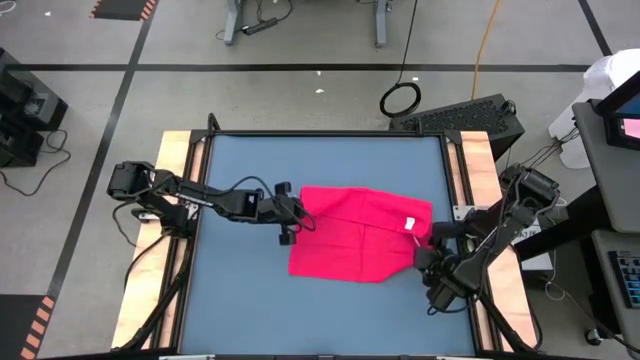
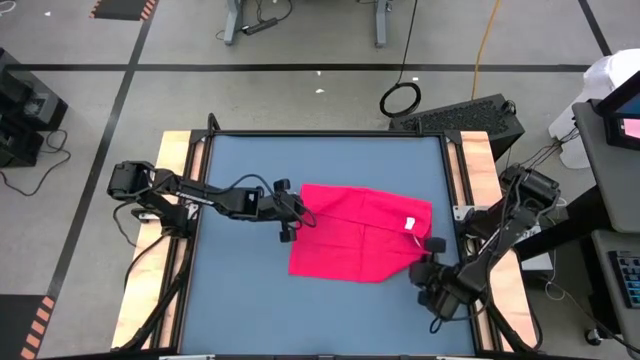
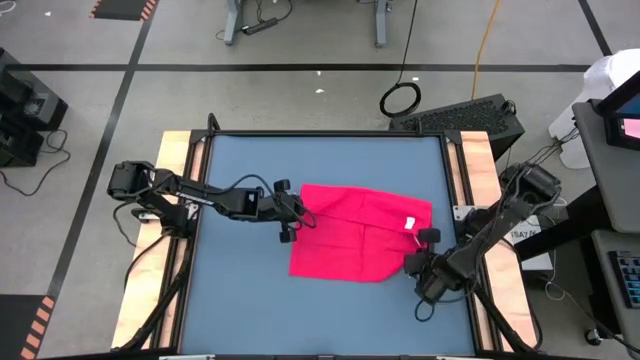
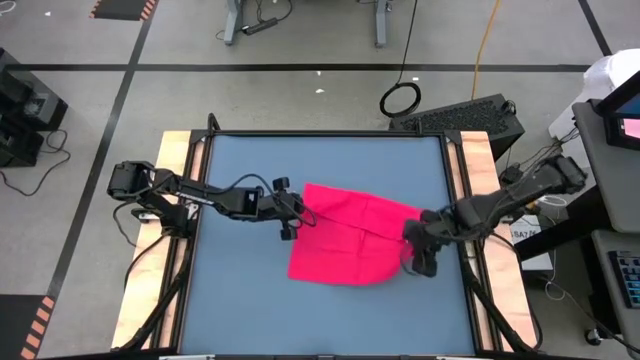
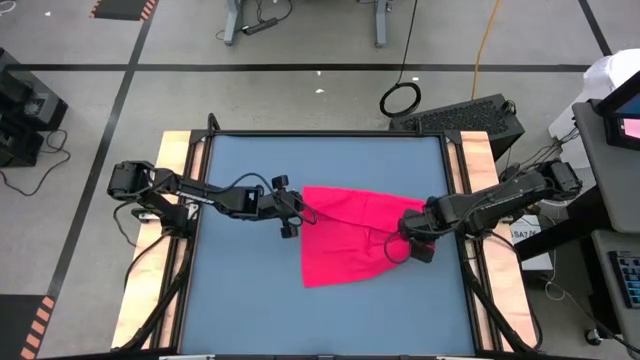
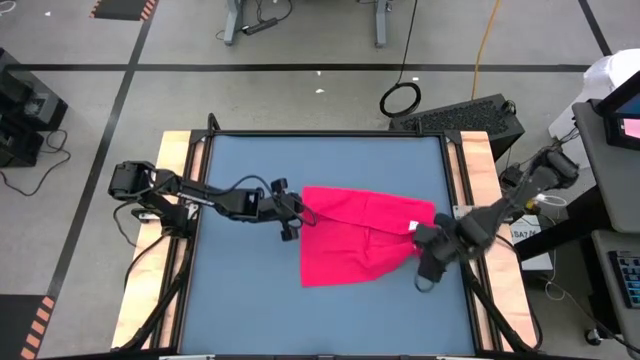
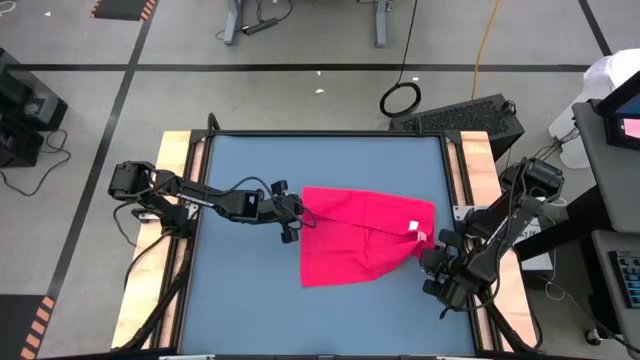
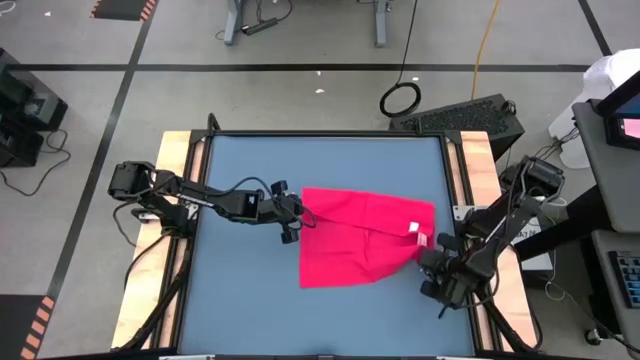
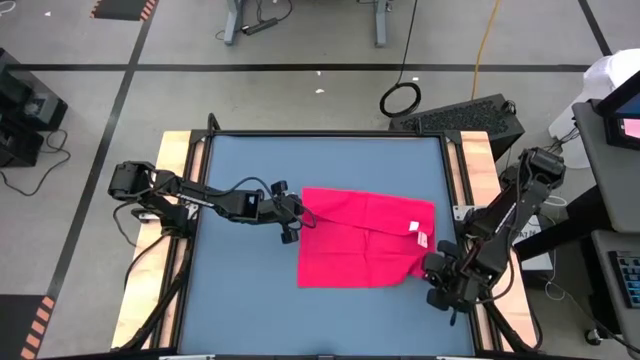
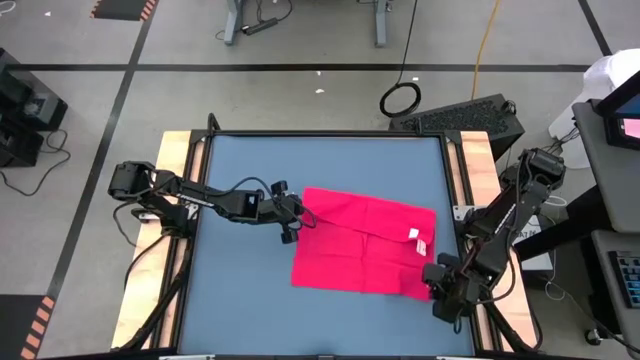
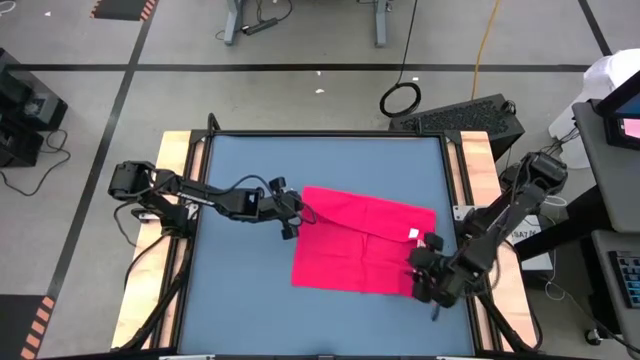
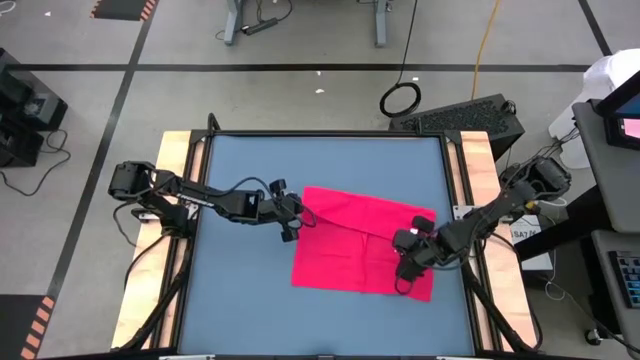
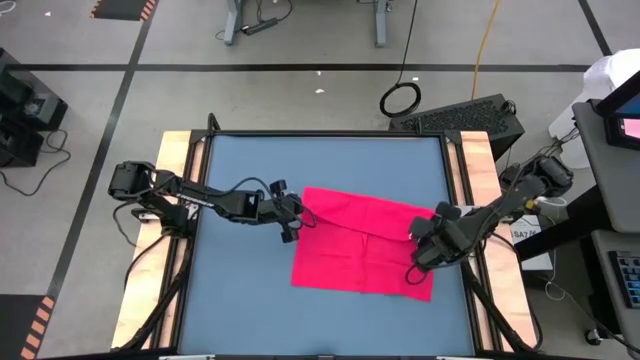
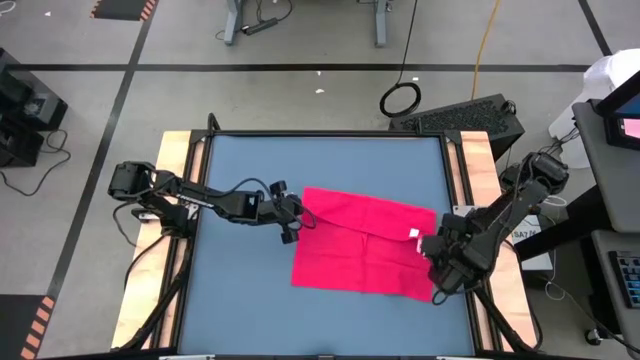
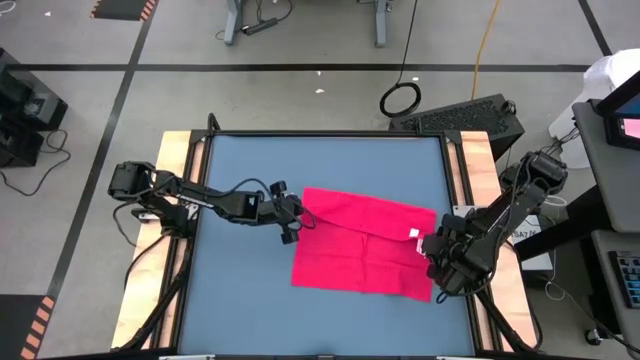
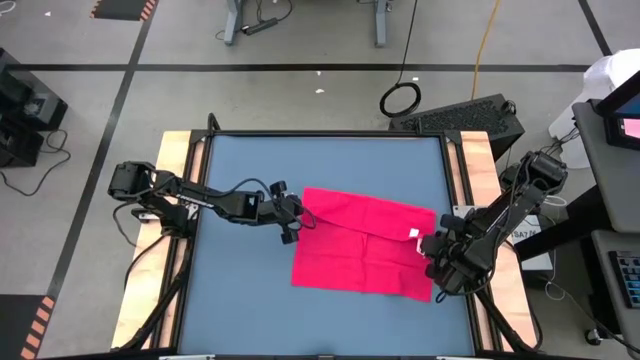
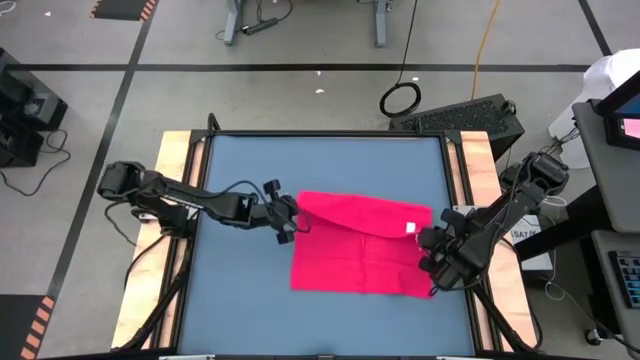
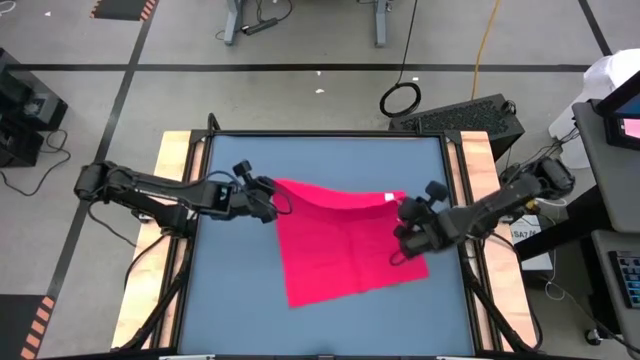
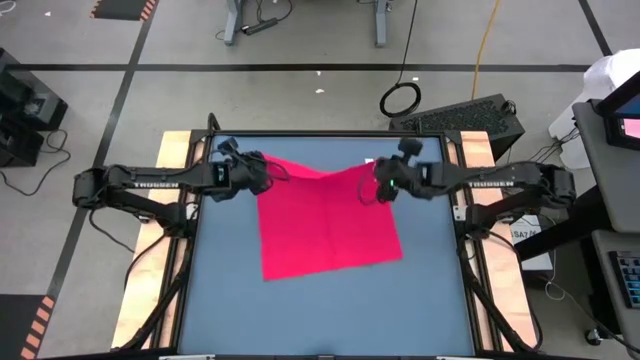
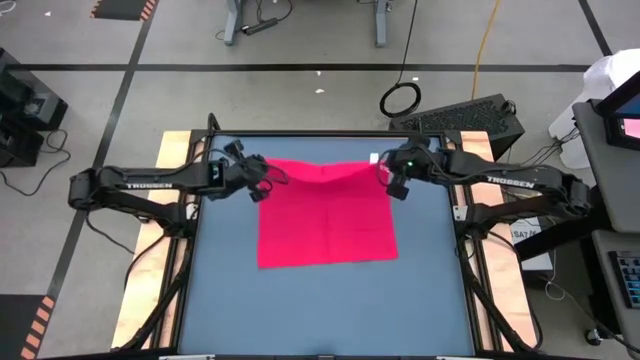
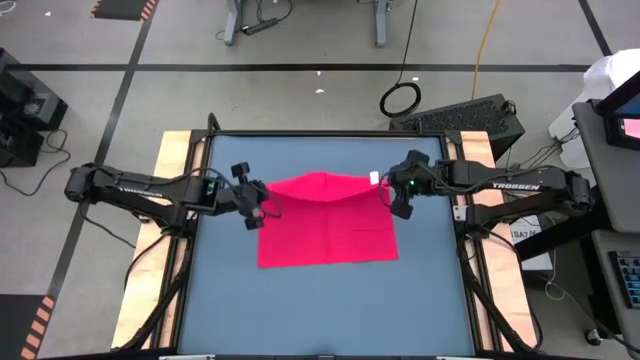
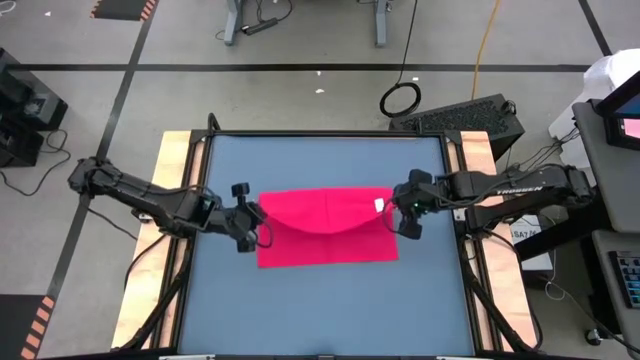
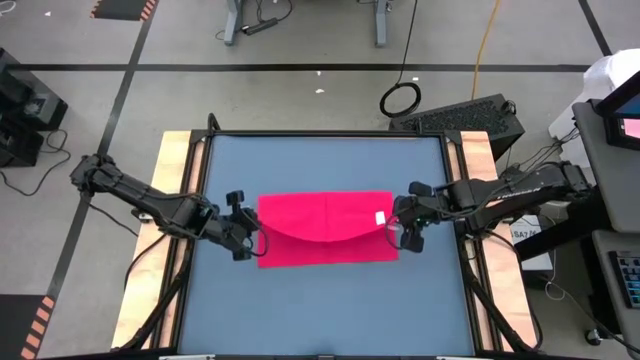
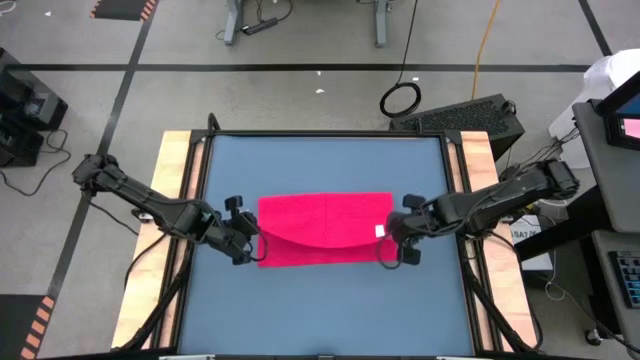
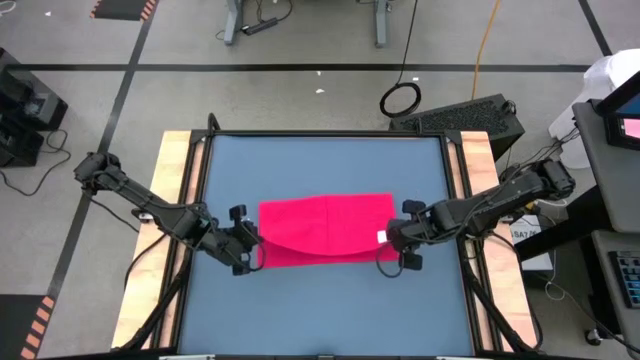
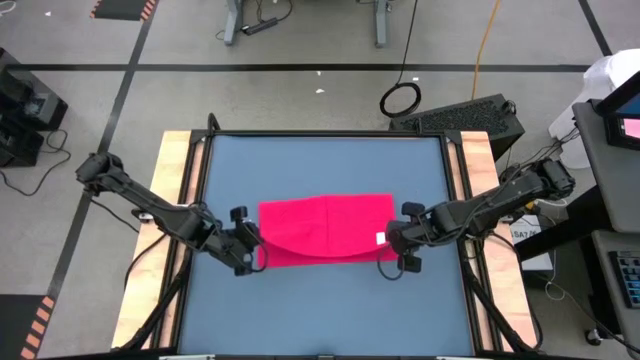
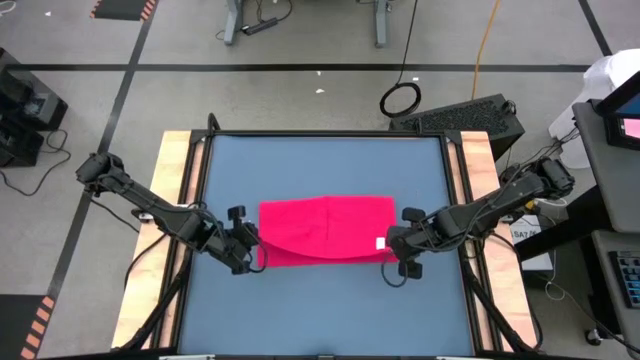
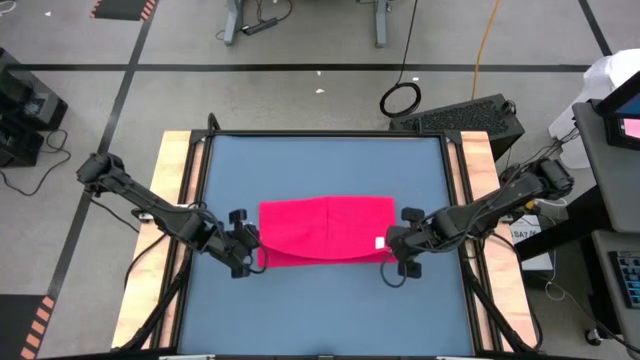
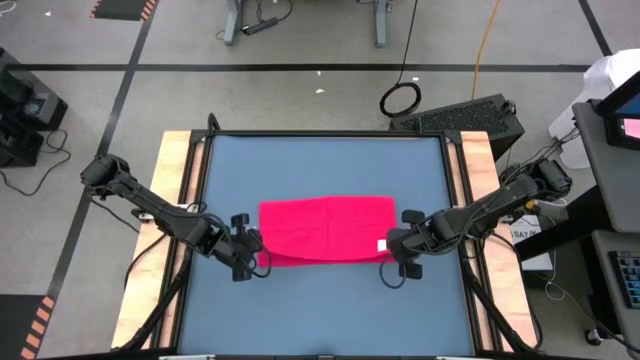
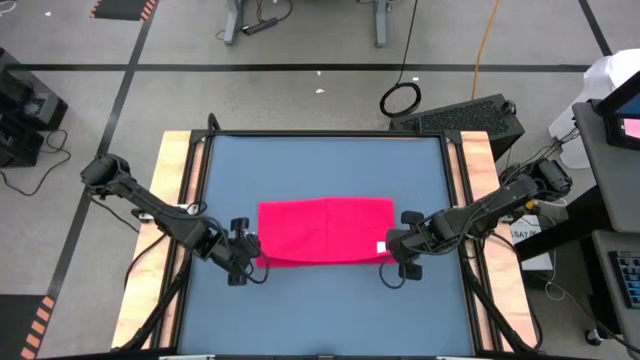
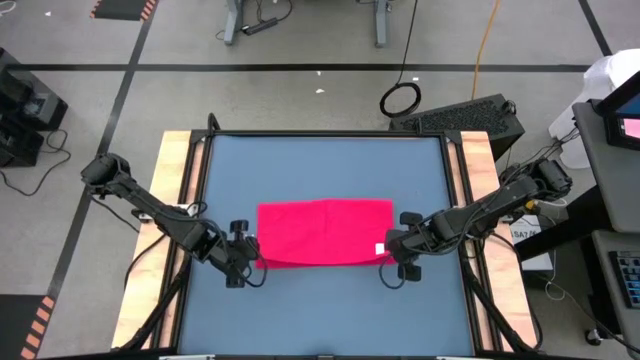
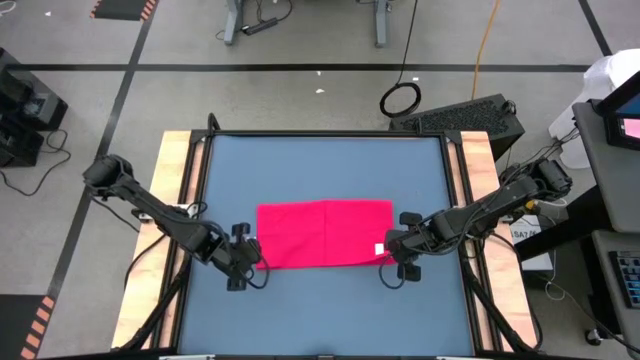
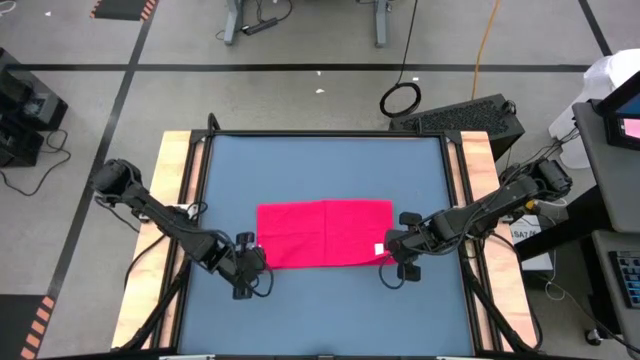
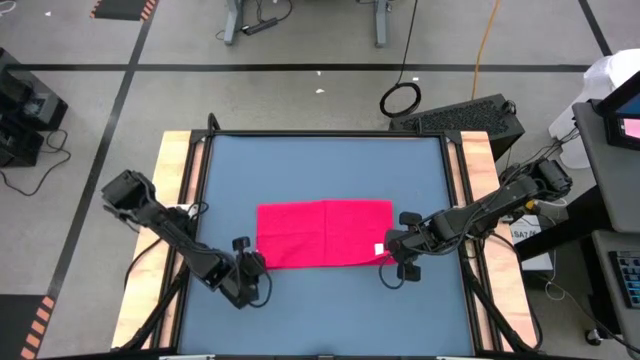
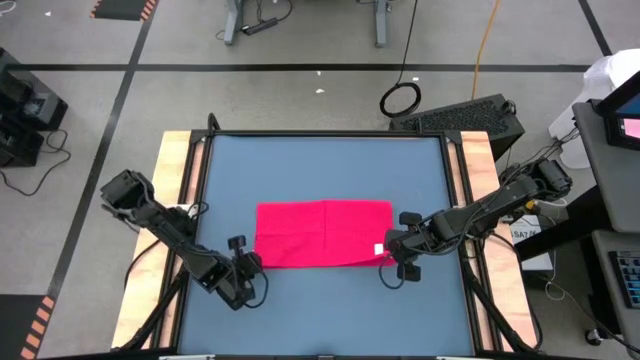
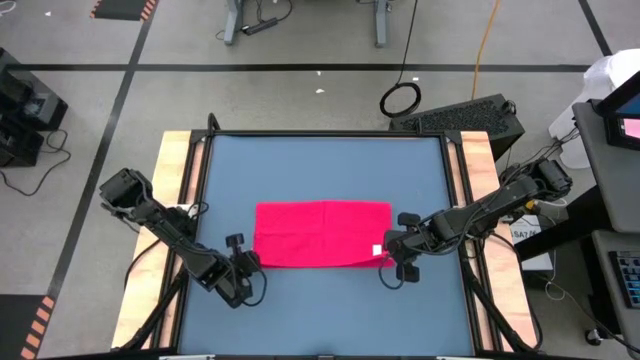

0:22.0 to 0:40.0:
Task: Roll towel
Fold the red towel

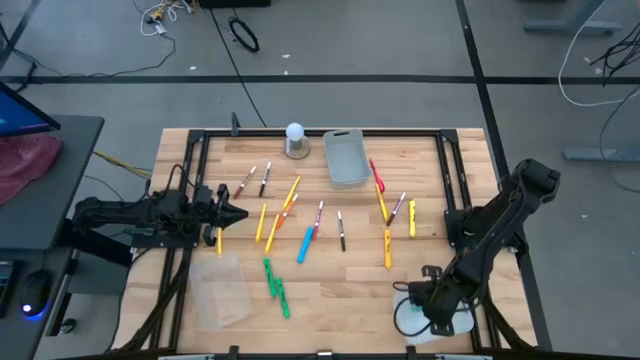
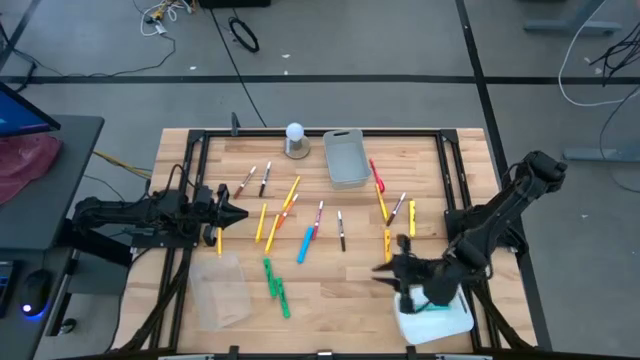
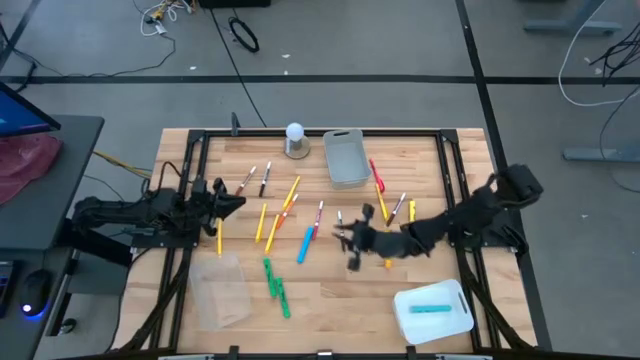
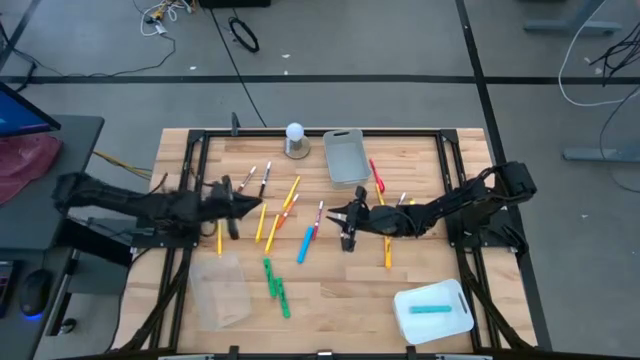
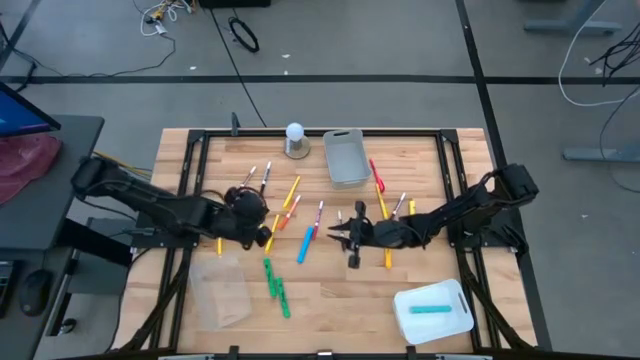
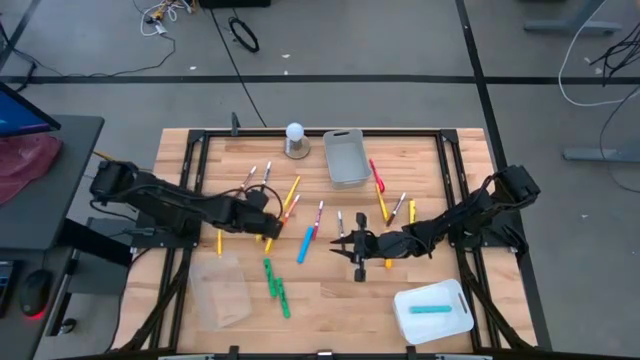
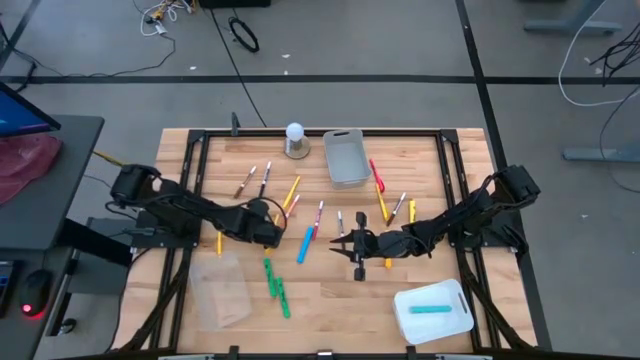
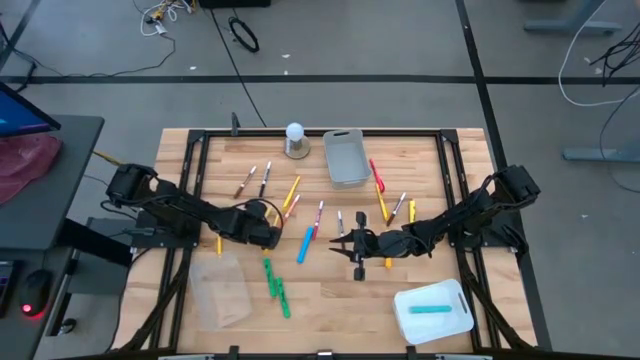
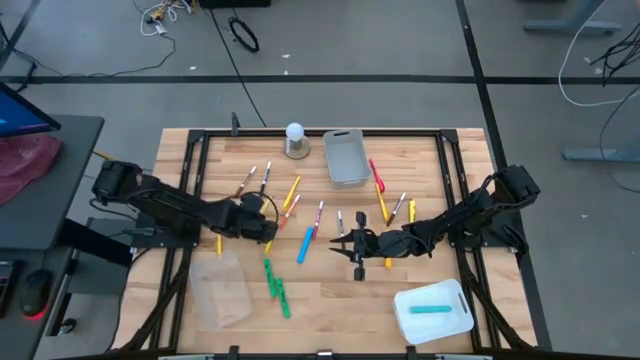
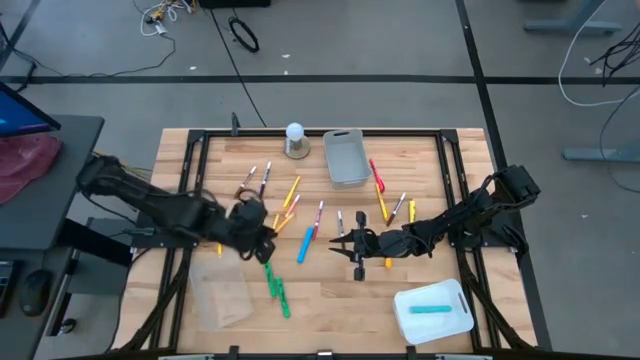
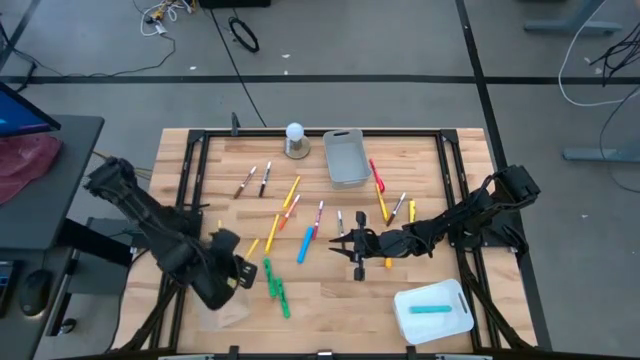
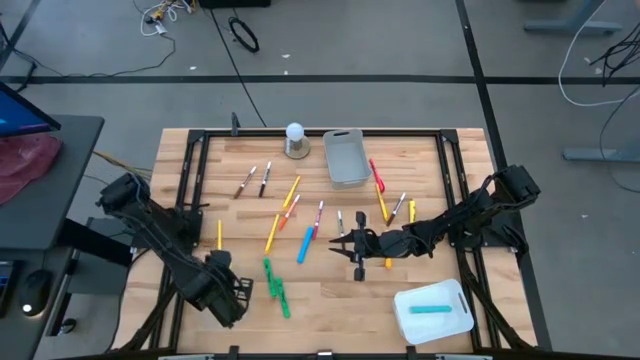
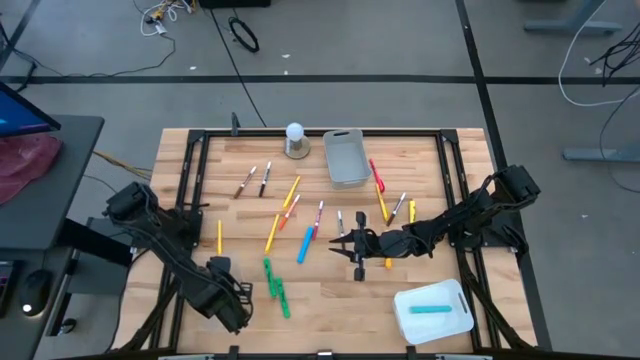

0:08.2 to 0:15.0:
Task: Pick & Place Markers
Put the yellow pen into the transparent bin
